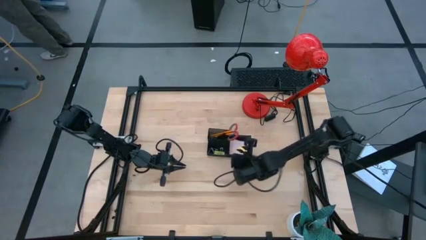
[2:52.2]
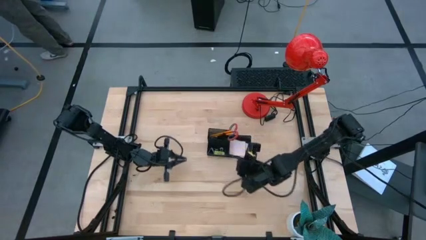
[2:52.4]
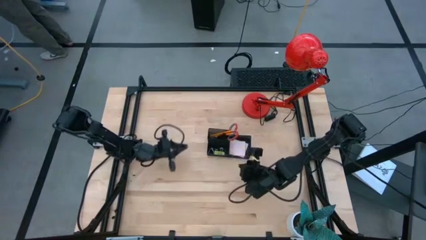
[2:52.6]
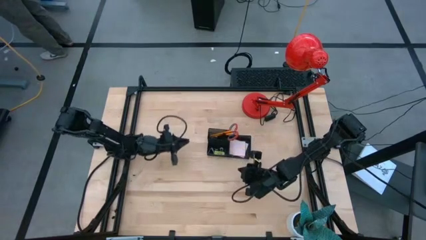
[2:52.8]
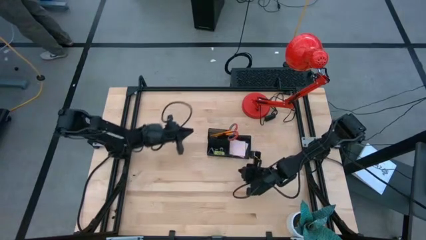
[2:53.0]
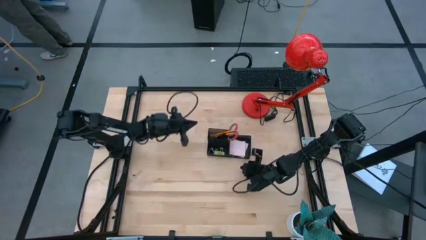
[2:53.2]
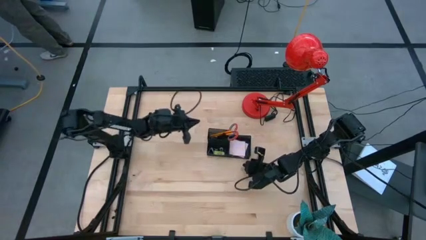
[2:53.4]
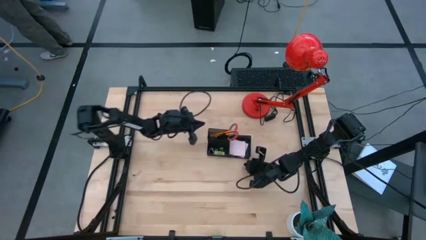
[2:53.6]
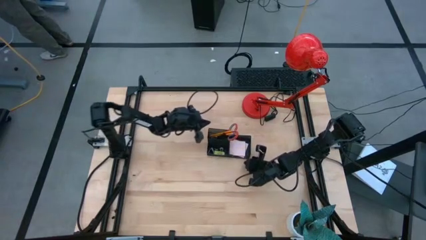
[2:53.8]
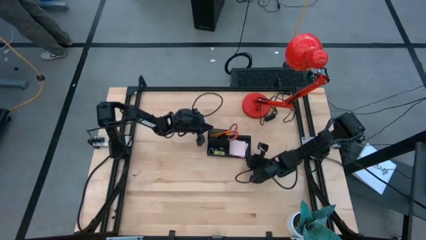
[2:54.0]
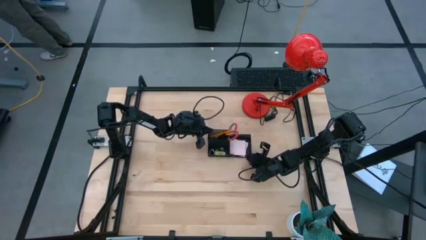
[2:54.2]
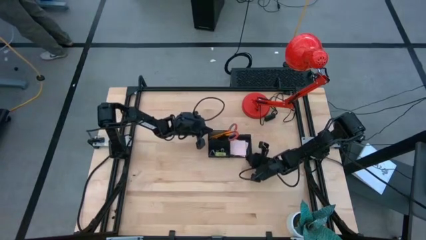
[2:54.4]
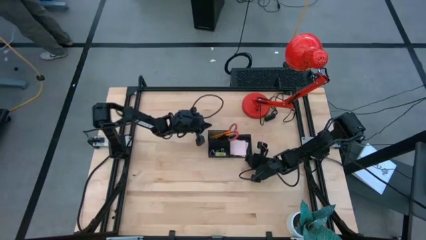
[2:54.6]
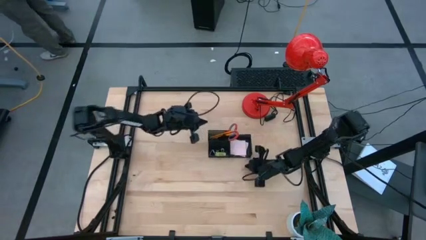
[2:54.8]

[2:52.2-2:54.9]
Task: Pick and place office supplies into organizer
Adjust the black desk organizer

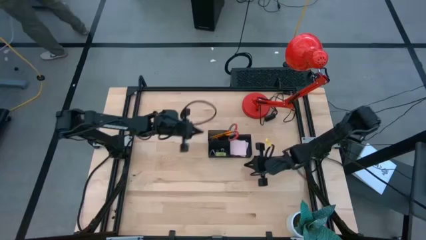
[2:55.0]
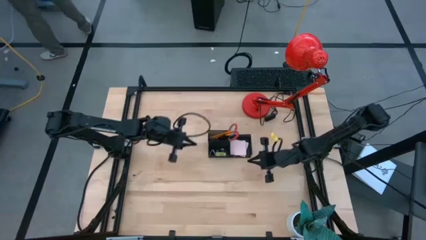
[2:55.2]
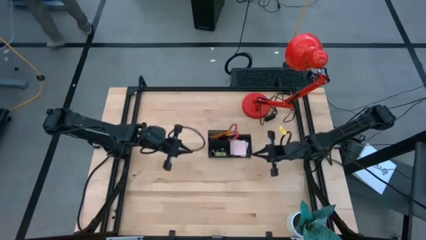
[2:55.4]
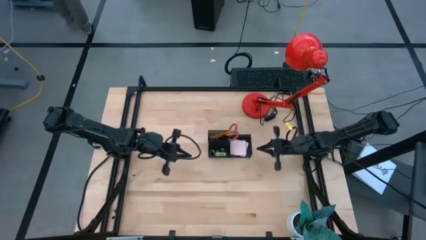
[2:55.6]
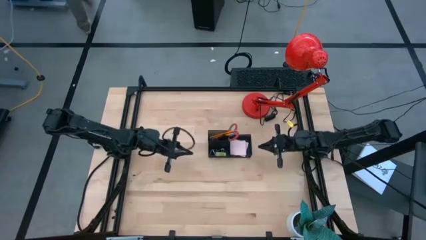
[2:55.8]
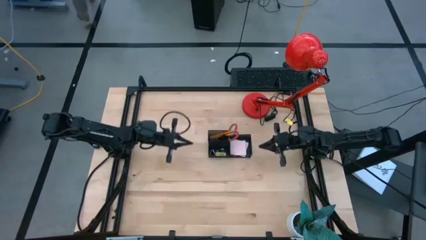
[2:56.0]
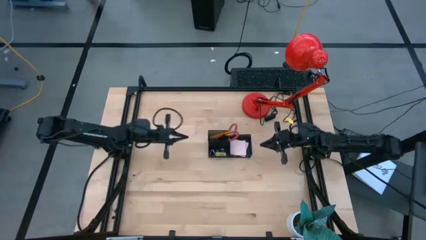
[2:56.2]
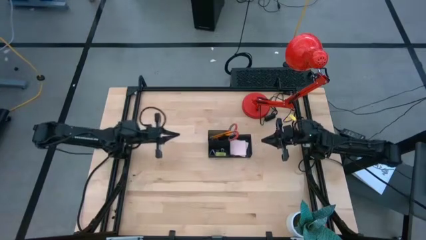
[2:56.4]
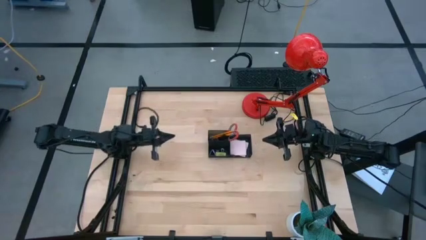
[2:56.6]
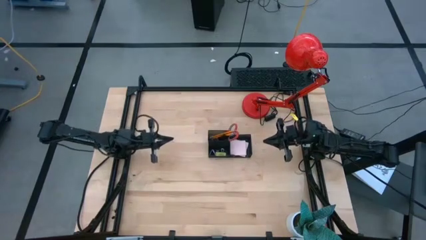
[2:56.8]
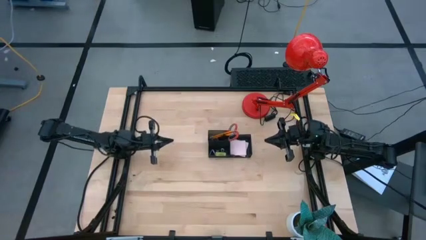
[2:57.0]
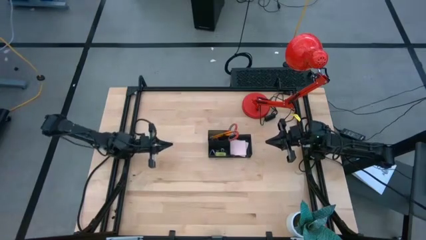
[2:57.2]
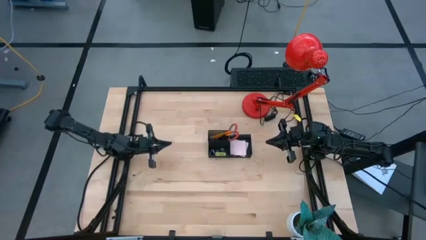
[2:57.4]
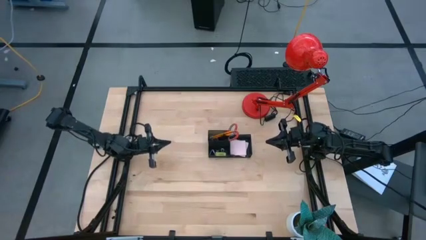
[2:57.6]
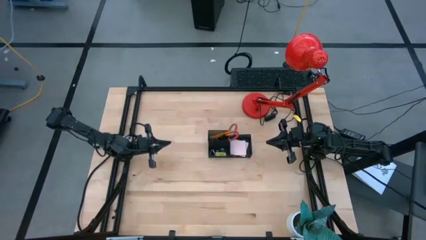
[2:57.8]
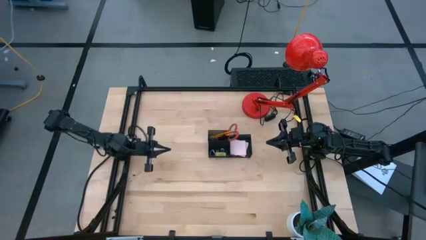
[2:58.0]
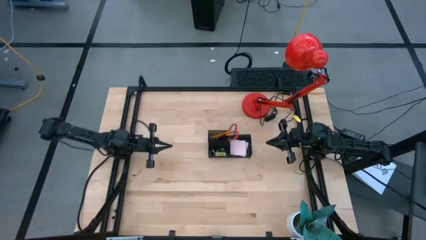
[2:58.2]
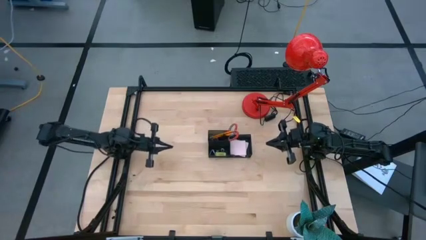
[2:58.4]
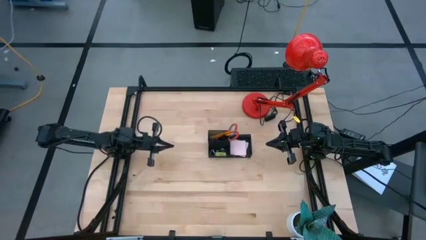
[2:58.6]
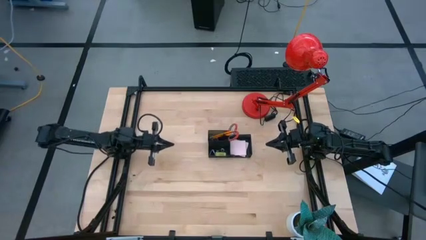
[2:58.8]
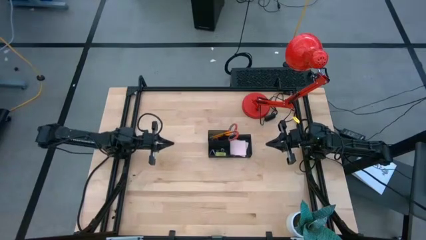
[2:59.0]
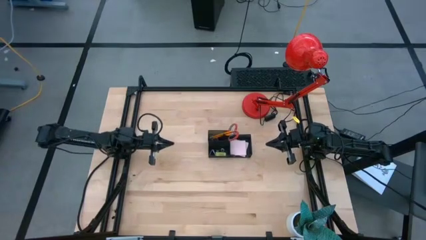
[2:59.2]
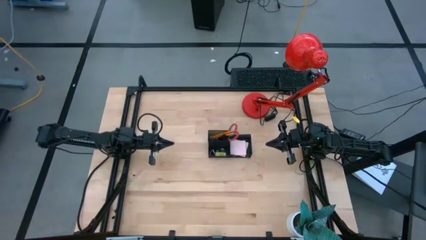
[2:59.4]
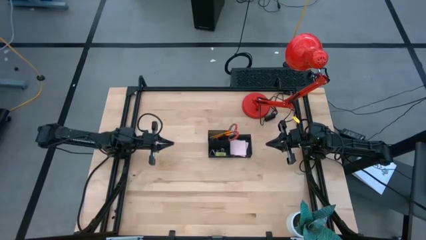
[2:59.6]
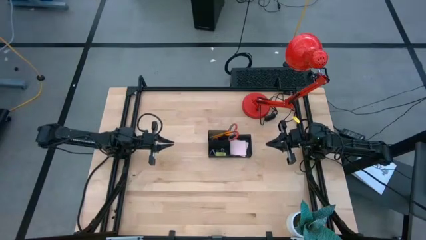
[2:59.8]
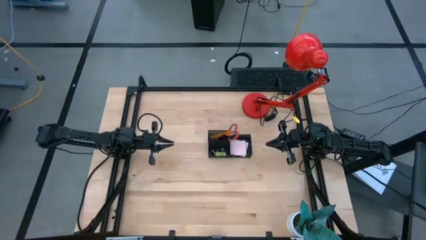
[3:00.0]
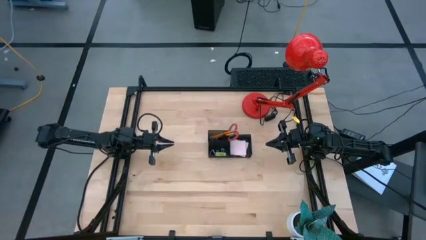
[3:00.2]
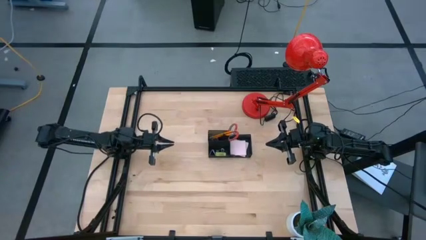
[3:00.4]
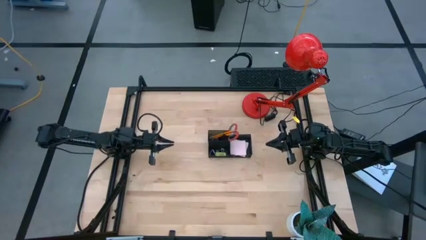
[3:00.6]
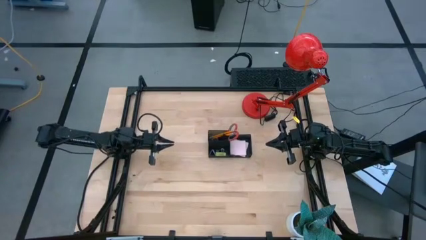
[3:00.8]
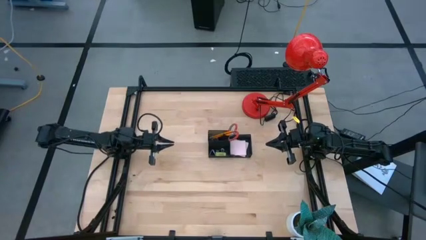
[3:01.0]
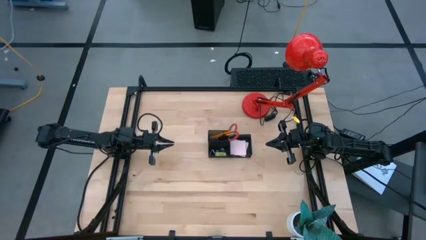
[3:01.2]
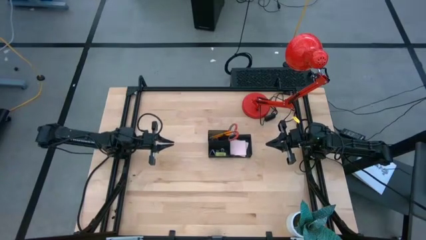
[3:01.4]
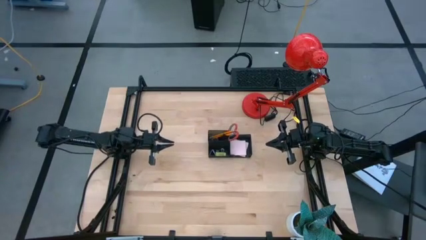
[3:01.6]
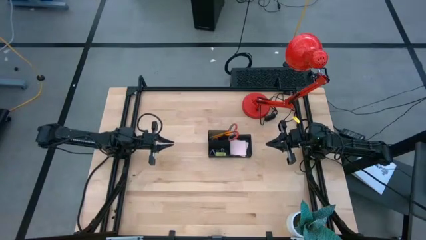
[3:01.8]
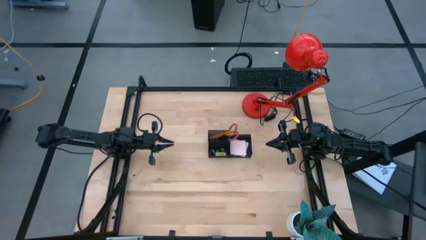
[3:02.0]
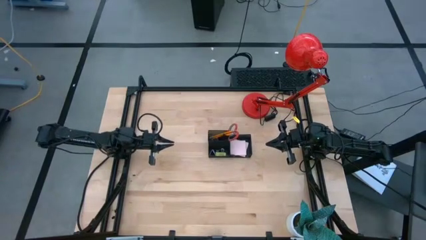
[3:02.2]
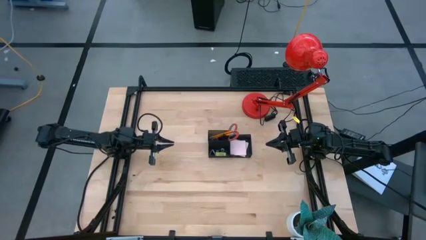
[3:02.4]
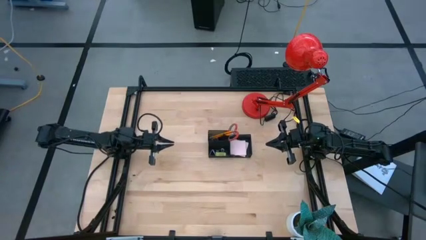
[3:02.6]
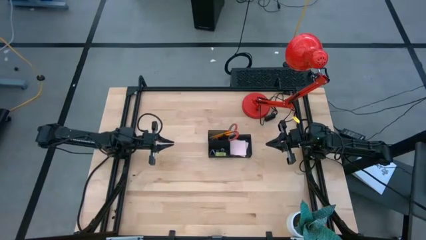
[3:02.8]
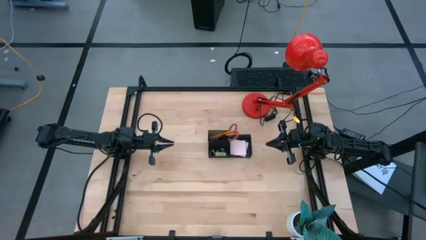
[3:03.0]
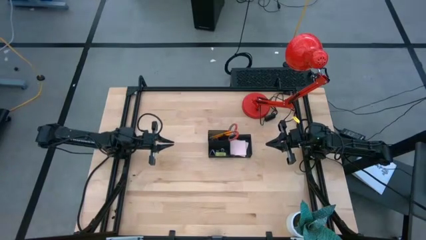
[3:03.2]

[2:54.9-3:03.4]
Return to Home Position
